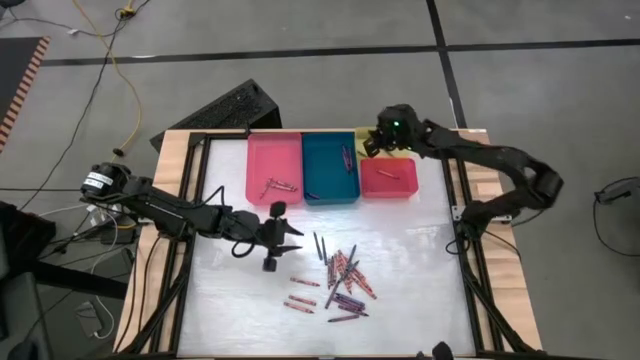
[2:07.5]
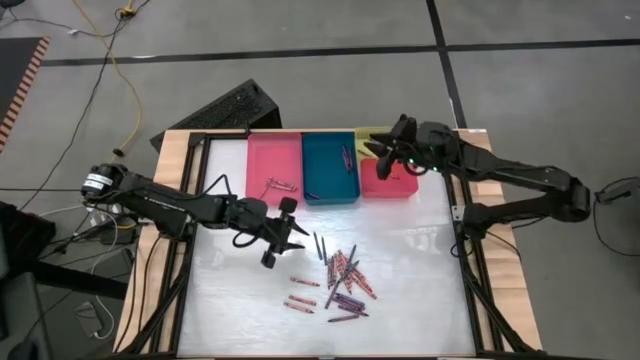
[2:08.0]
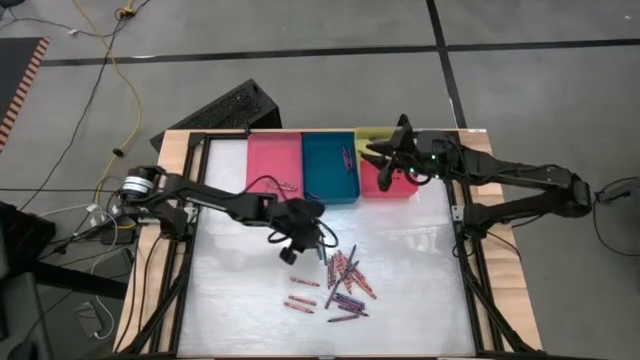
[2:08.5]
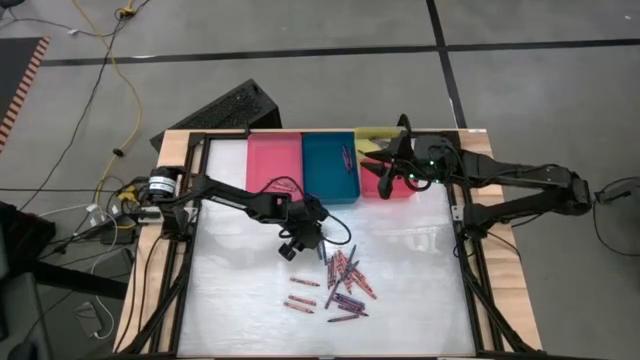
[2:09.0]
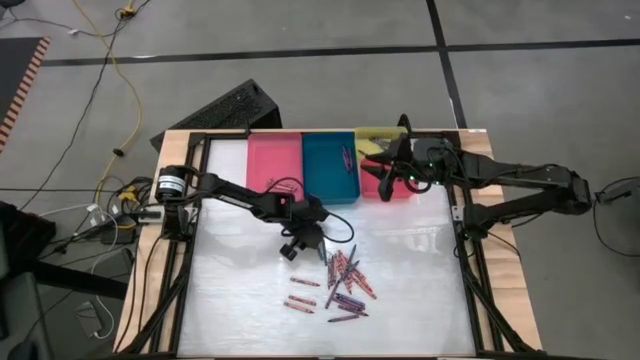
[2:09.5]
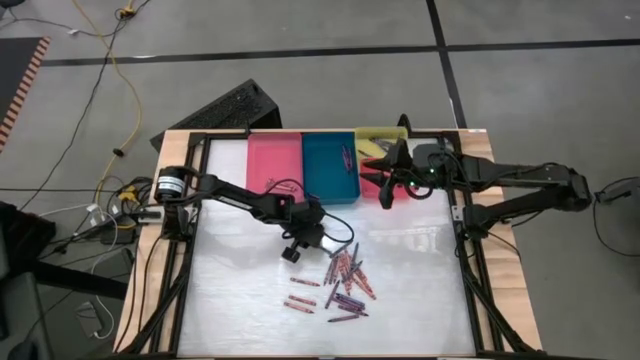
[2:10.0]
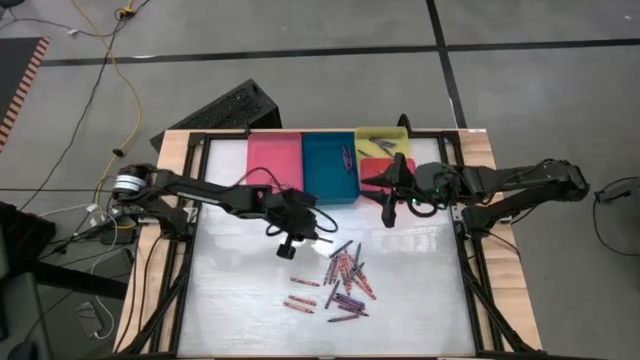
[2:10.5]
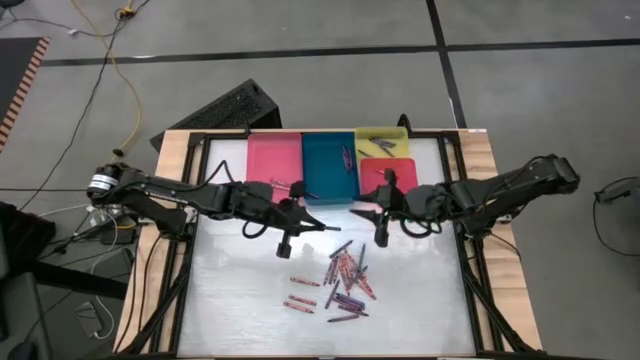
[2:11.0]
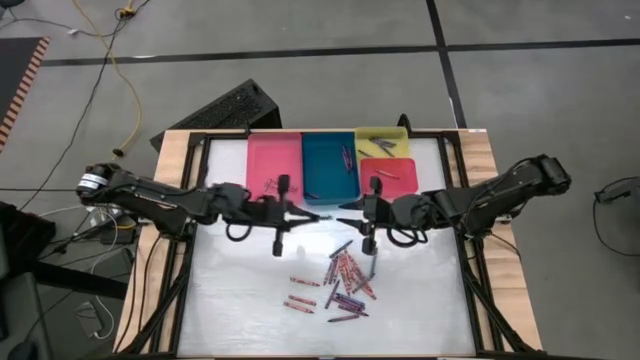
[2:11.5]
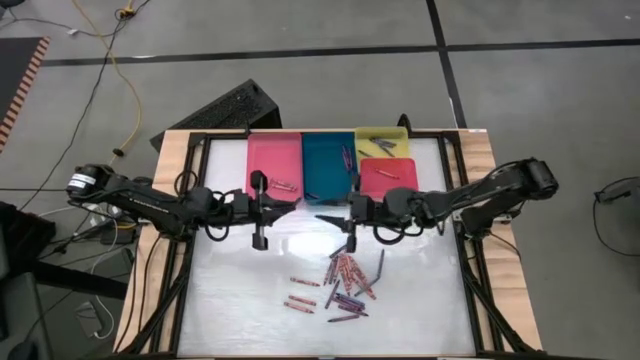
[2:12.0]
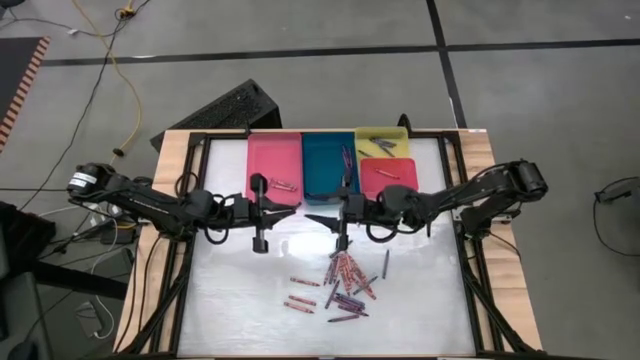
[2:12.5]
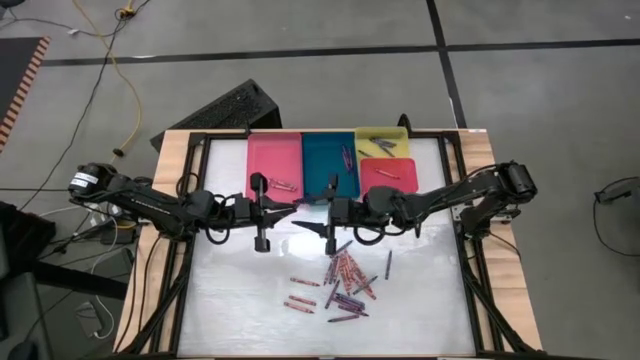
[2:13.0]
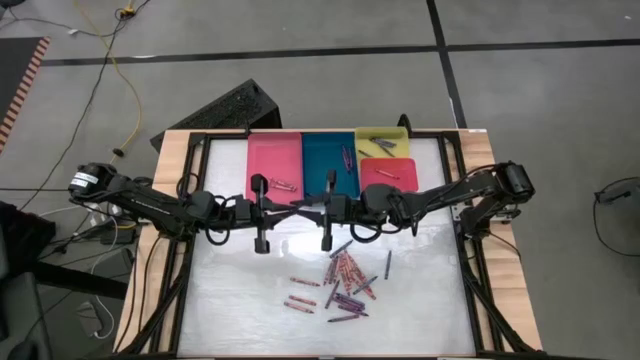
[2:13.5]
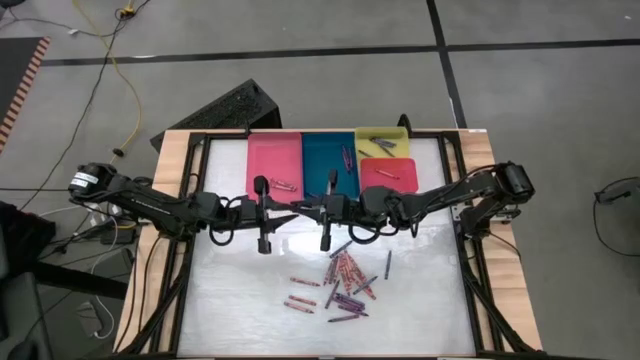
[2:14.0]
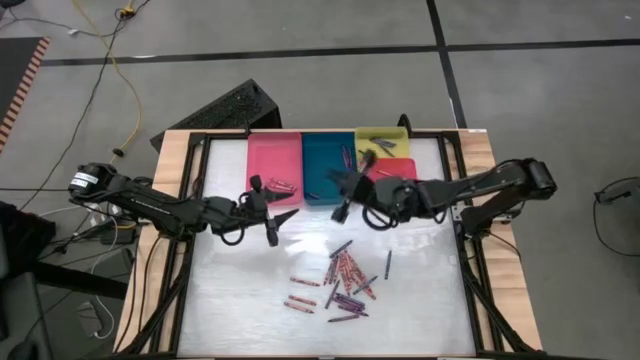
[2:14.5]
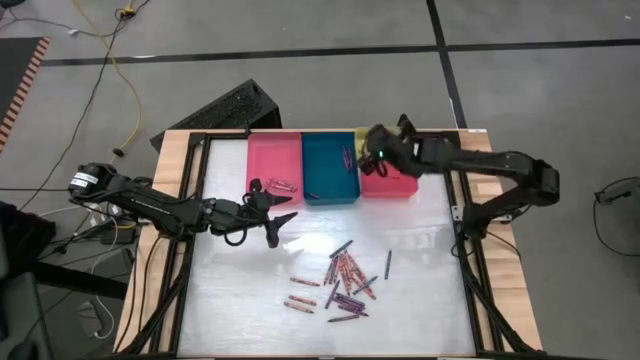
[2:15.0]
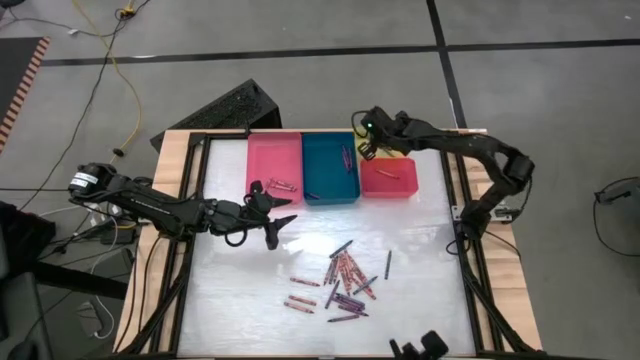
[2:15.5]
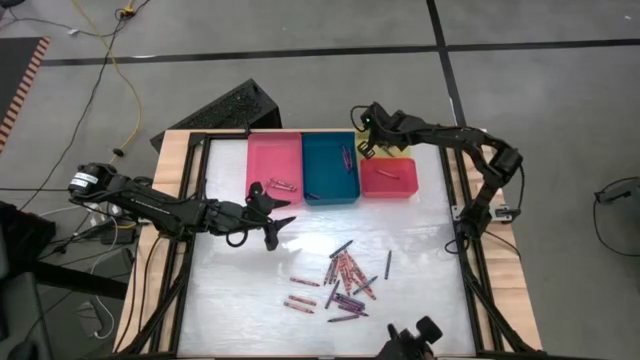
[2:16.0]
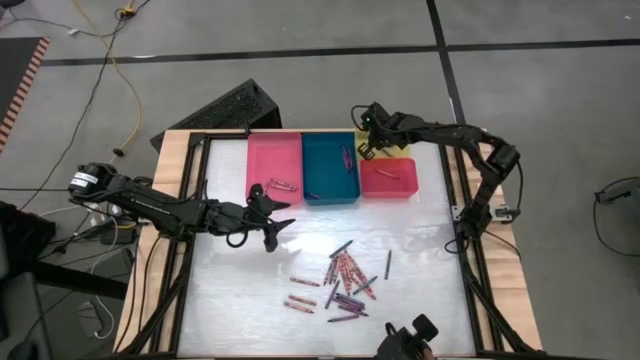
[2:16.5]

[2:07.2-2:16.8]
Task: Sort crayons
Put the blue crayon into the yellow bin

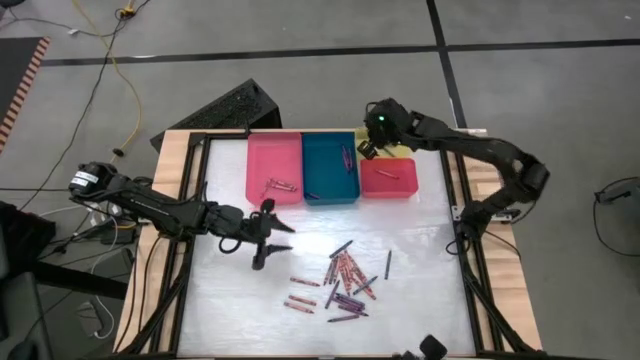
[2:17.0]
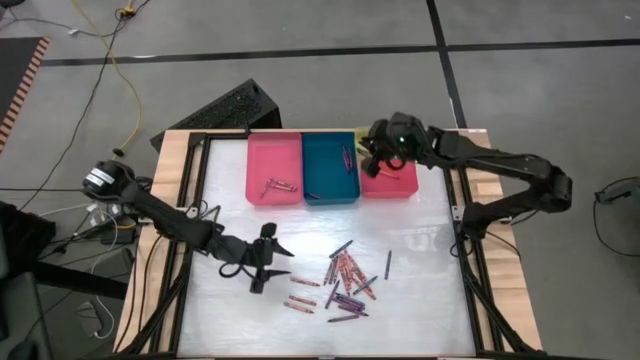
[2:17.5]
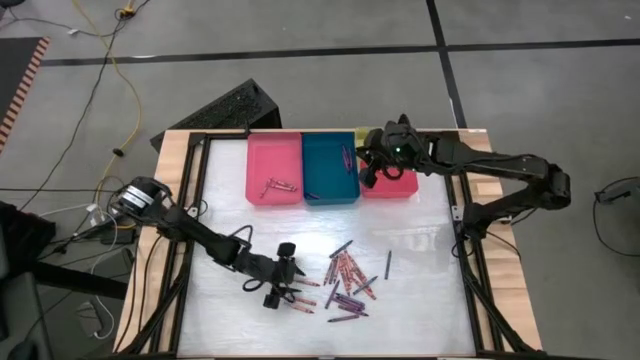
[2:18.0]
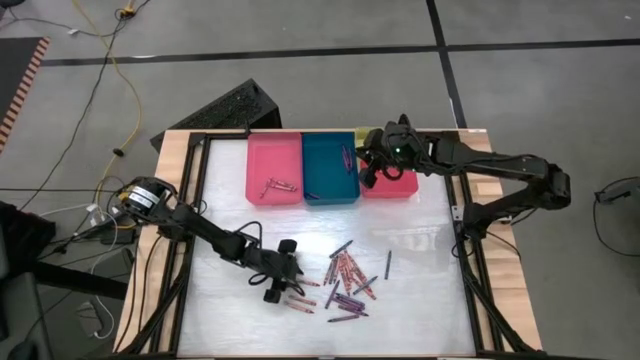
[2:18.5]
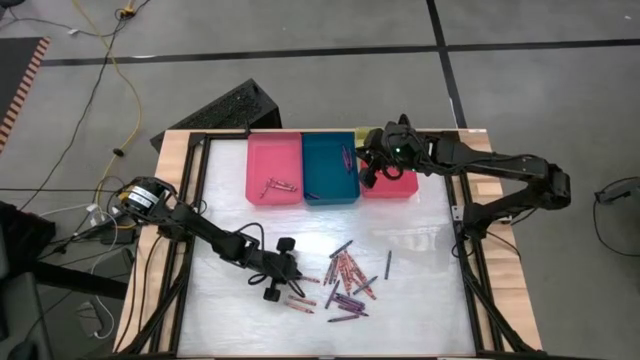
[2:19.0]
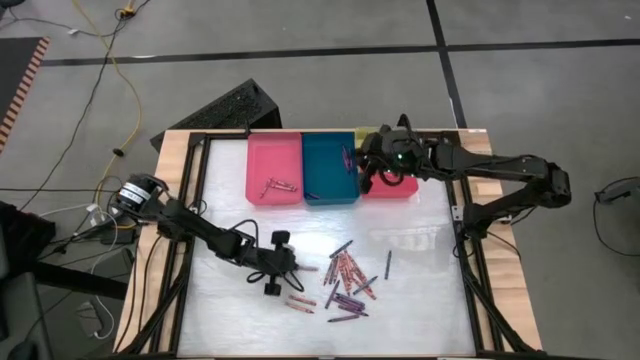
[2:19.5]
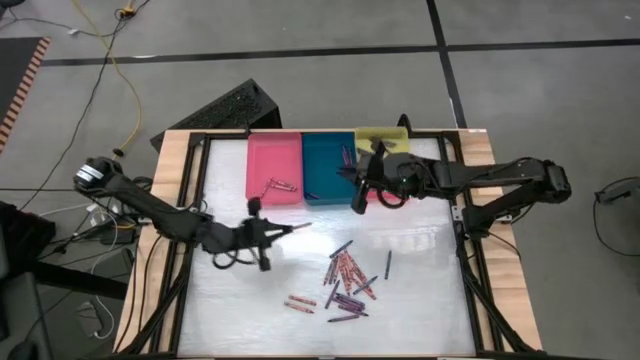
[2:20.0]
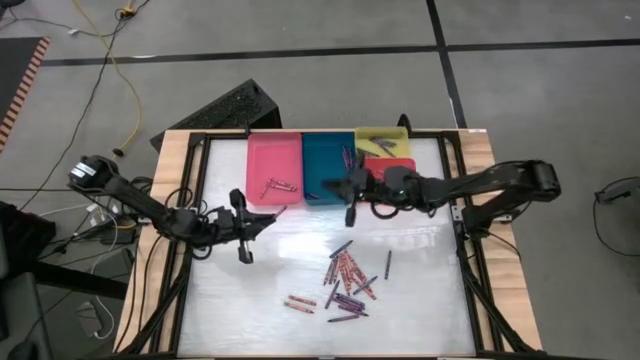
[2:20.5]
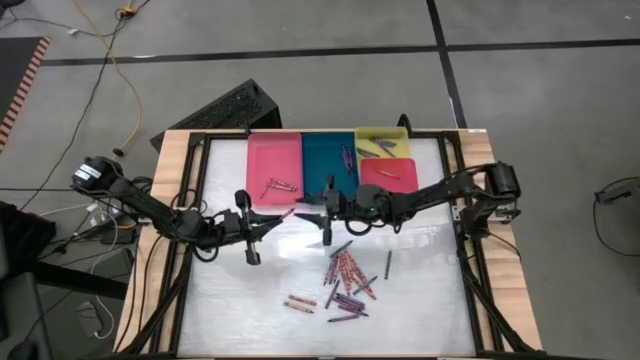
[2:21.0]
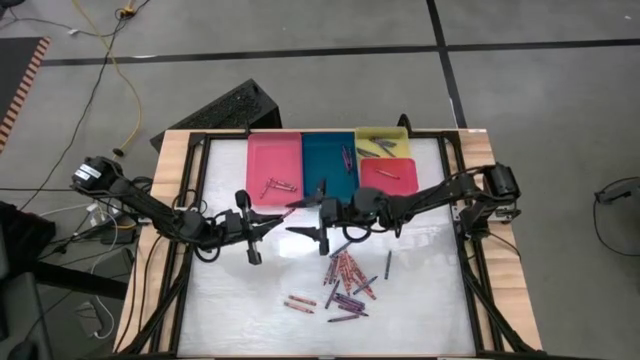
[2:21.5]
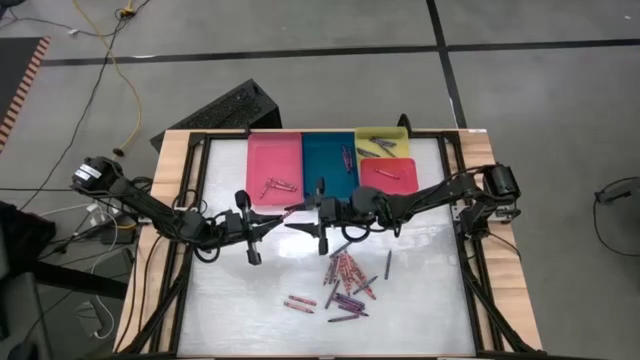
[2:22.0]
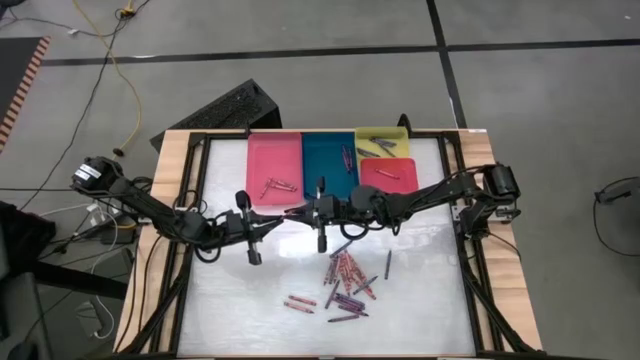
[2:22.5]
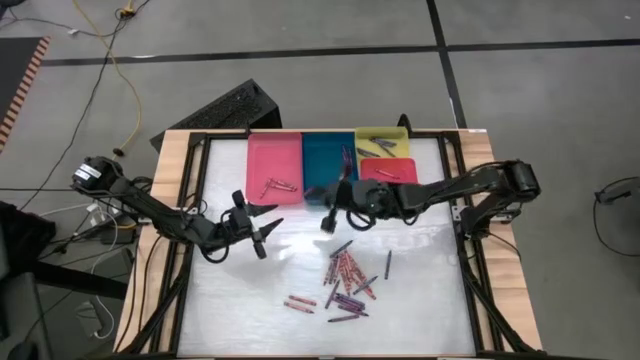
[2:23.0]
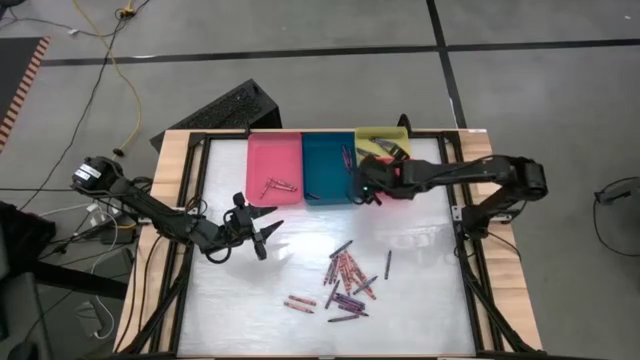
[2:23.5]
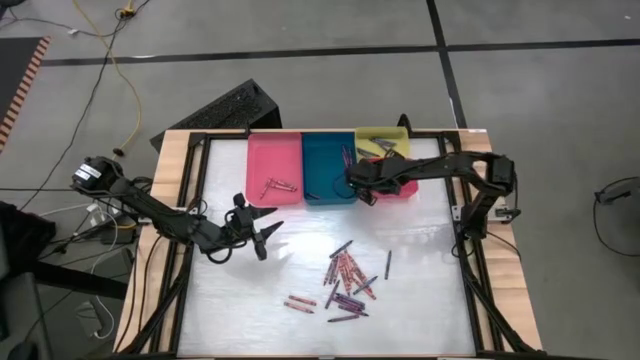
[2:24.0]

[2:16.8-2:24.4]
Put the red crayon into the red bin

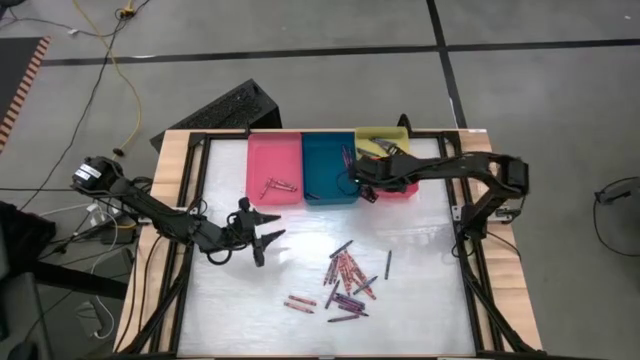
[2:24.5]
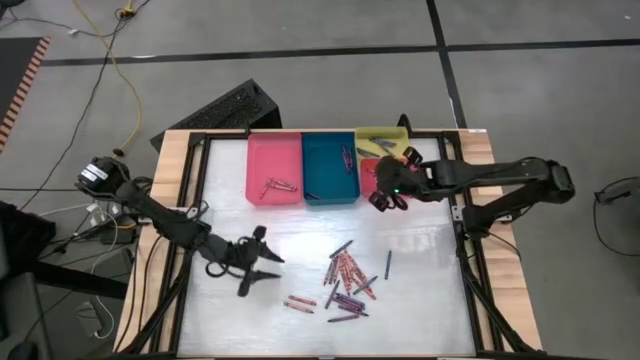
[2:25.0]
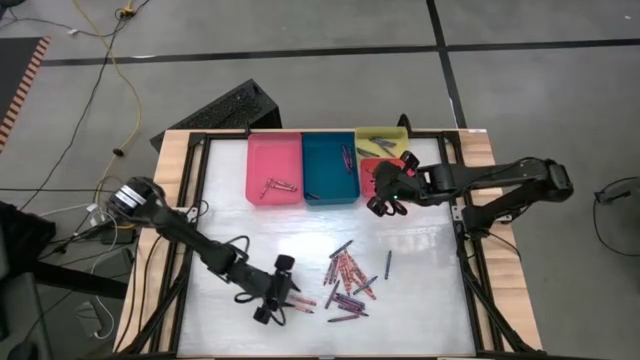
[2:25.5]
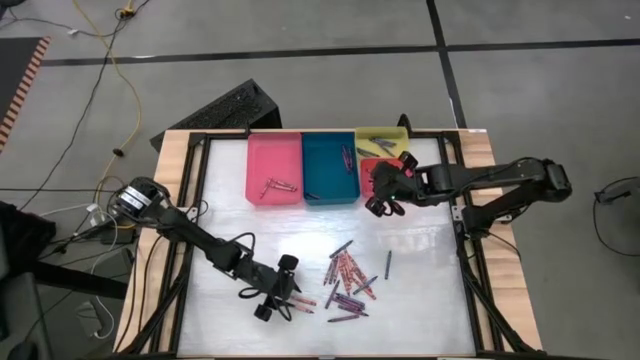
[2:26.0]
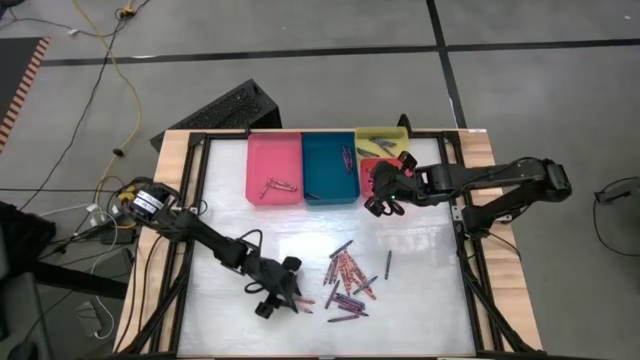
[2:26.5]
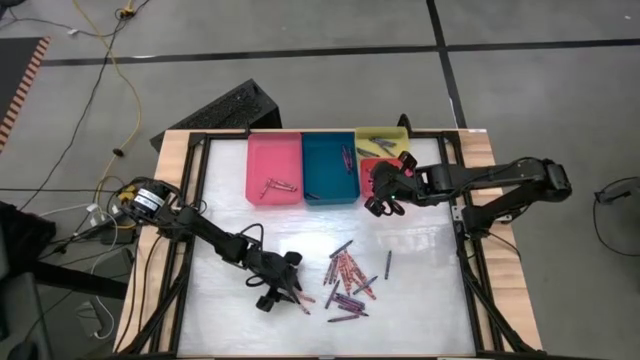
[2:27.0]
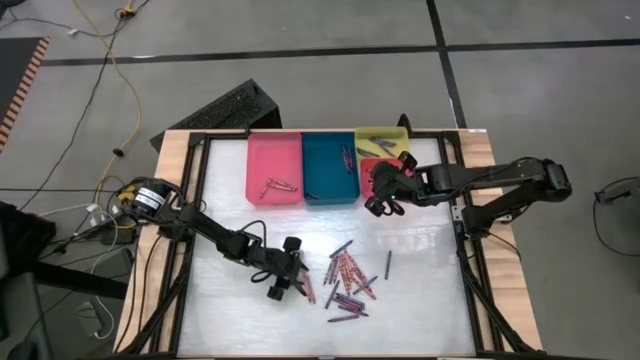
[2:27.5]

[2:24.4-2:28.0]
Put the red crayon into the red bin

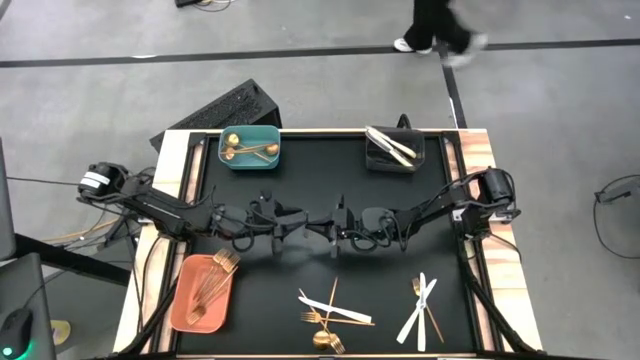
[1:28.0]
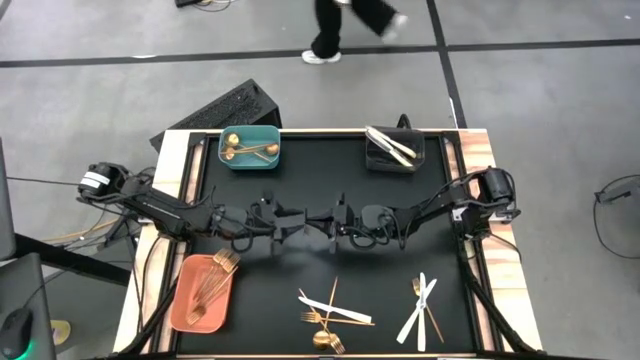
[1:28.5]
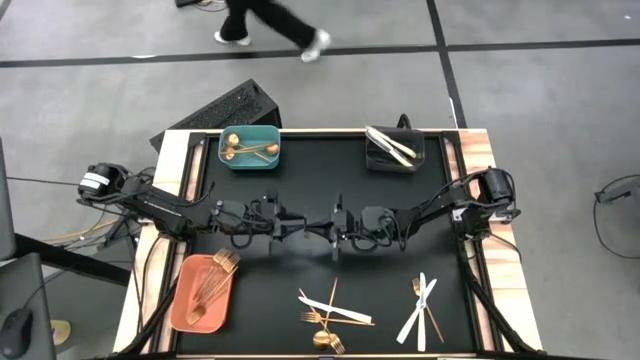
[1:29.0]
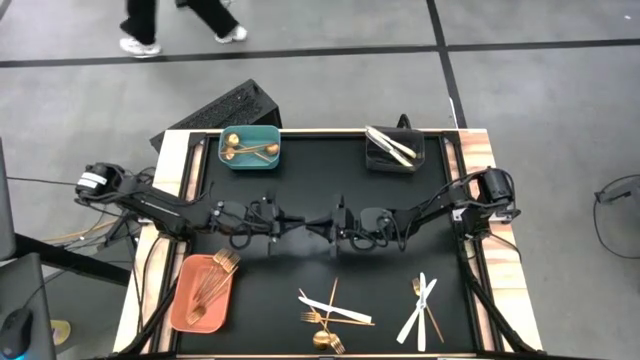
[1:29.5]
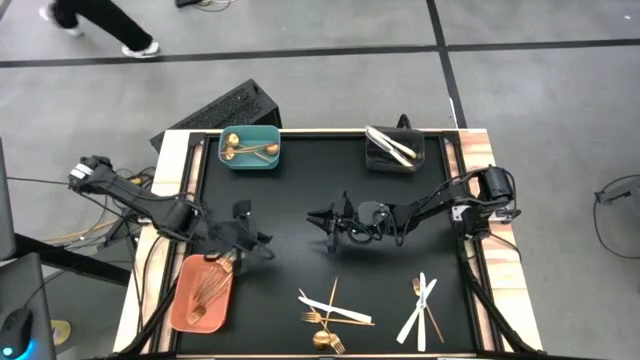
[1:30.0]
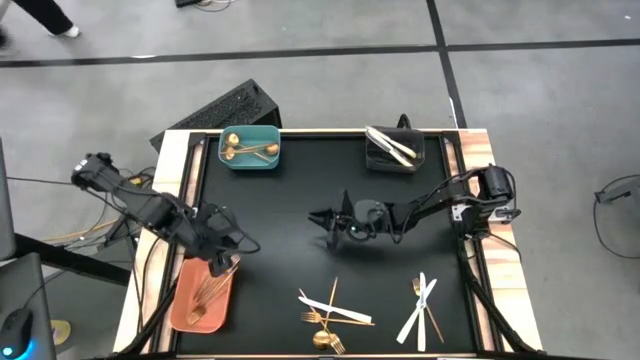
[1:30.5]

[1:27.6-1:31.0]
Task: Sort silverware by color (type)
Put the gold fork into the orange bin
